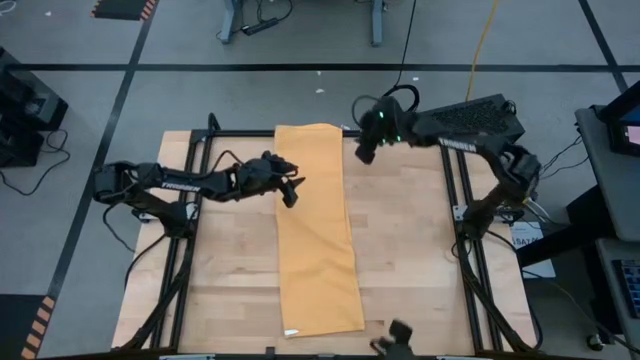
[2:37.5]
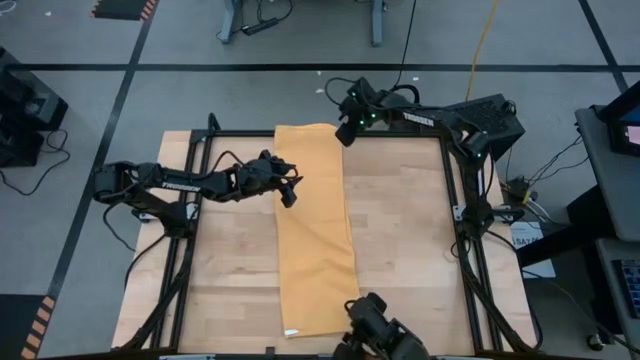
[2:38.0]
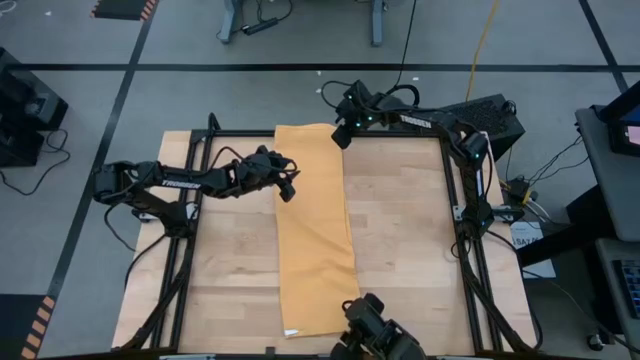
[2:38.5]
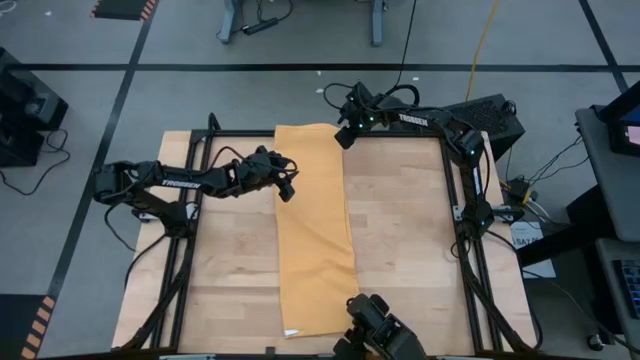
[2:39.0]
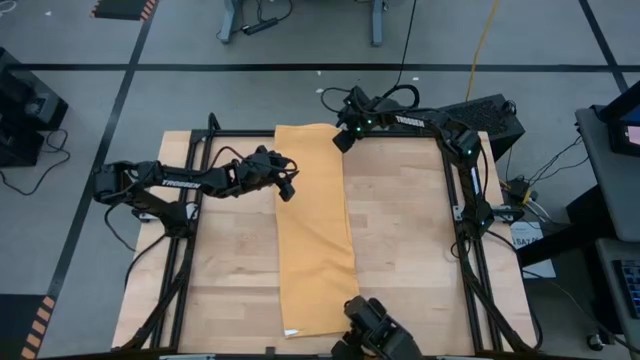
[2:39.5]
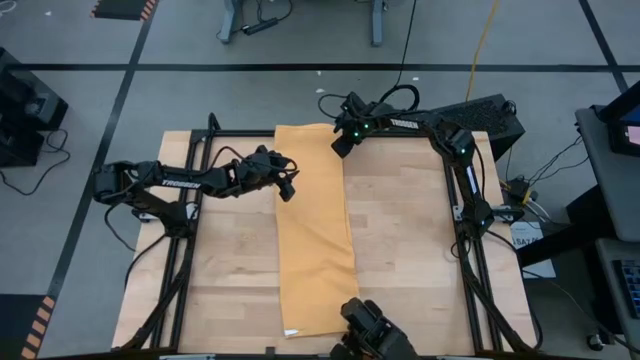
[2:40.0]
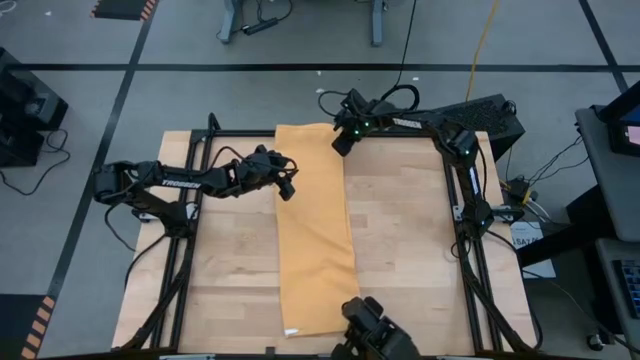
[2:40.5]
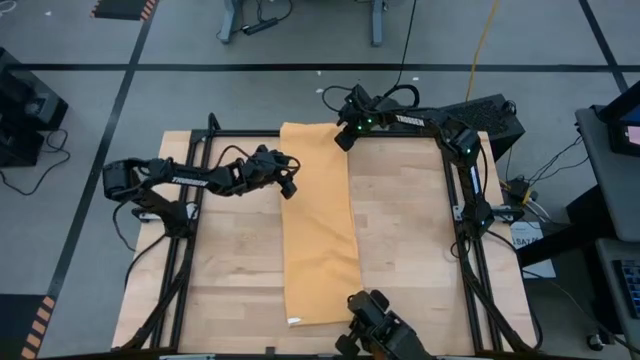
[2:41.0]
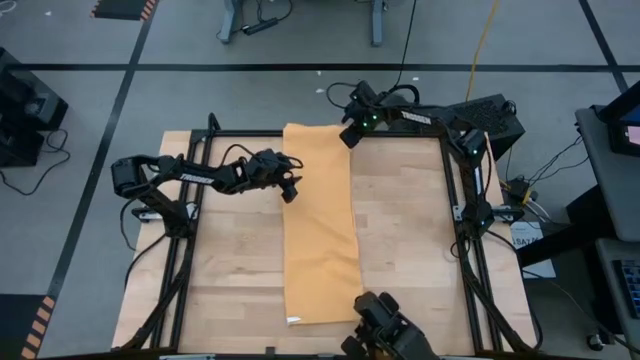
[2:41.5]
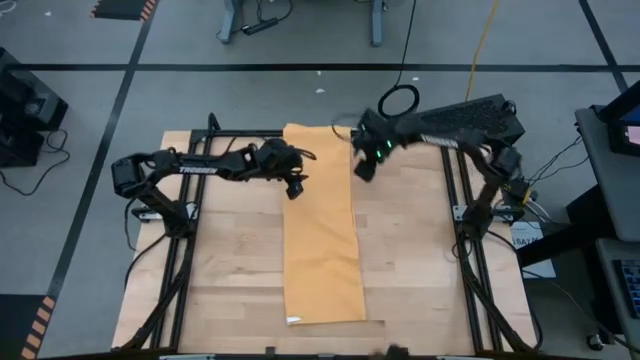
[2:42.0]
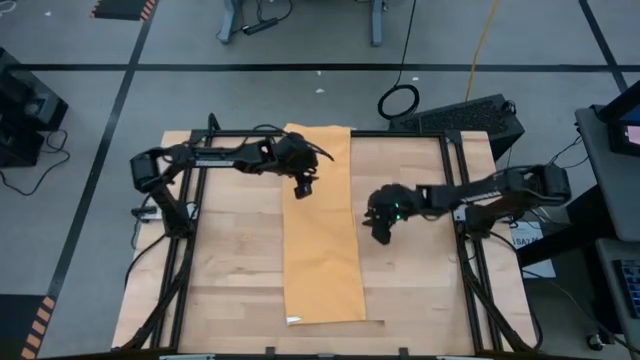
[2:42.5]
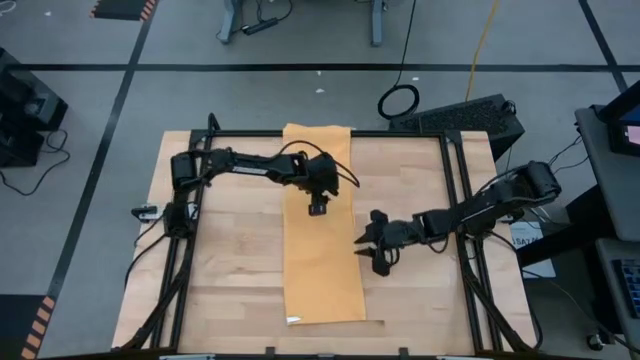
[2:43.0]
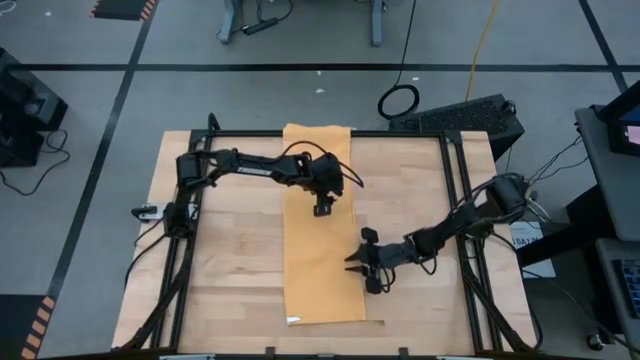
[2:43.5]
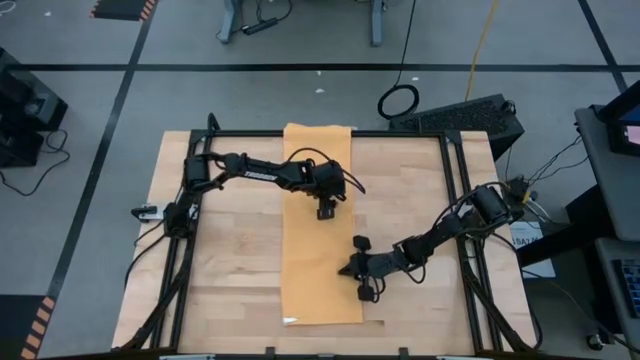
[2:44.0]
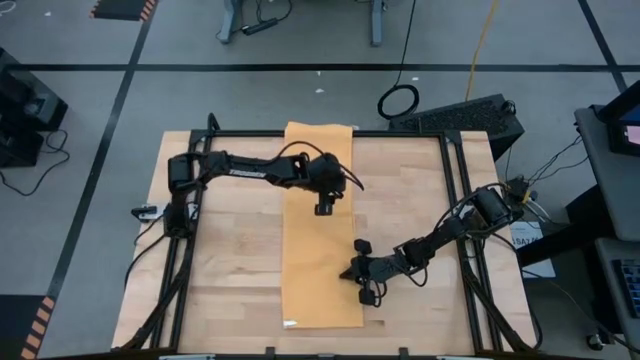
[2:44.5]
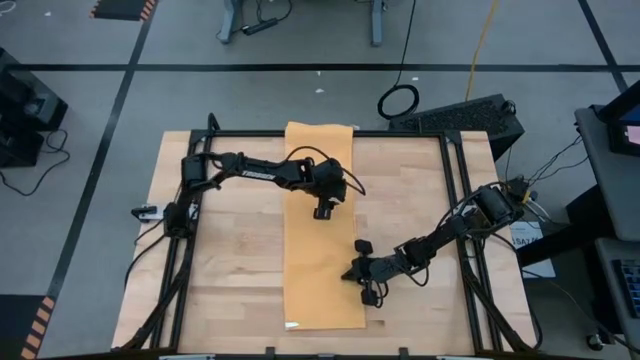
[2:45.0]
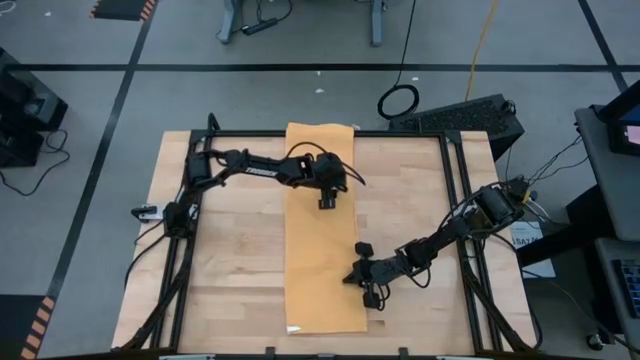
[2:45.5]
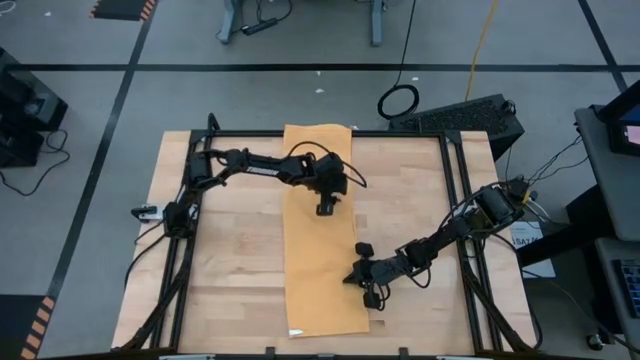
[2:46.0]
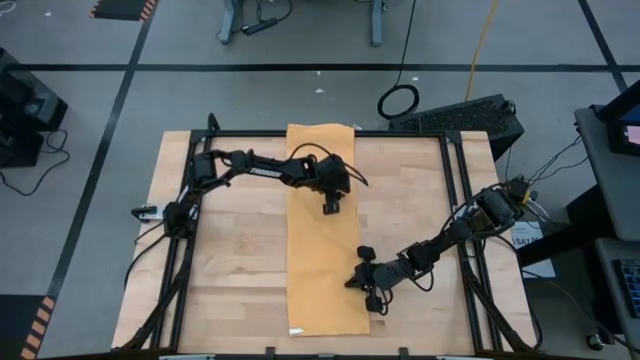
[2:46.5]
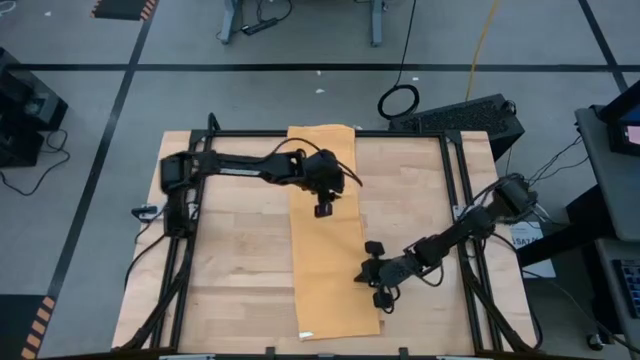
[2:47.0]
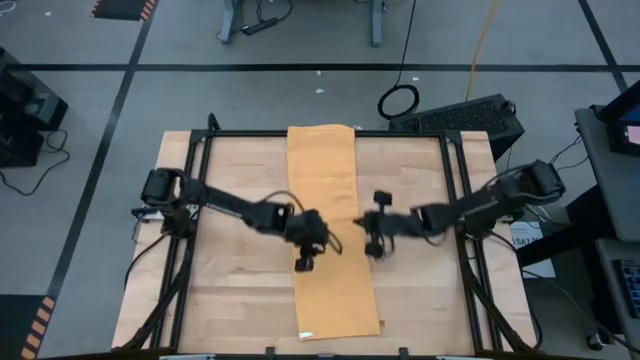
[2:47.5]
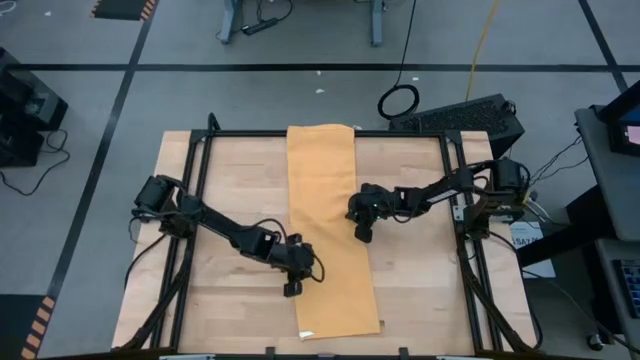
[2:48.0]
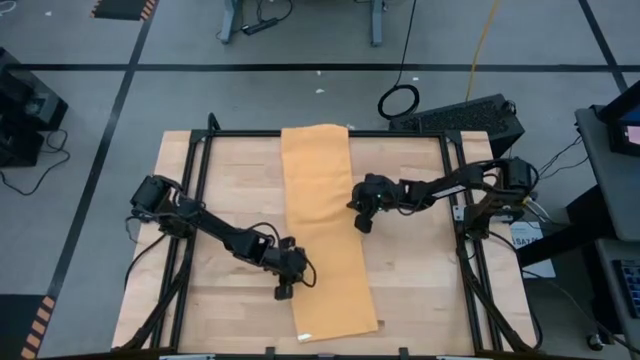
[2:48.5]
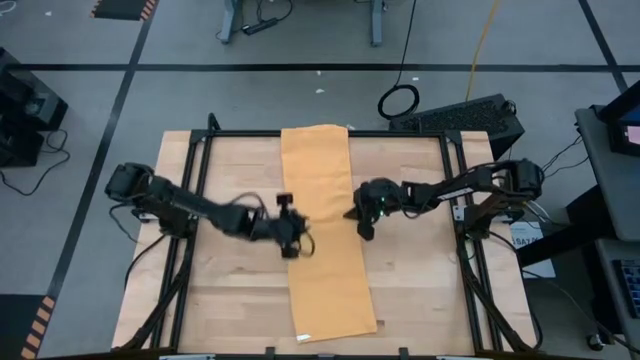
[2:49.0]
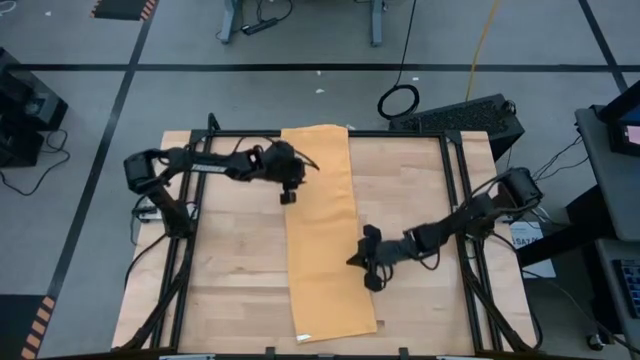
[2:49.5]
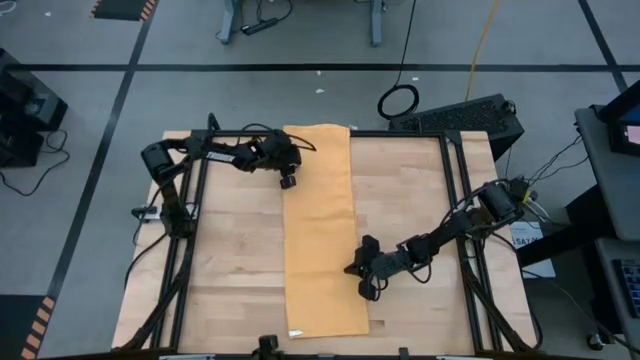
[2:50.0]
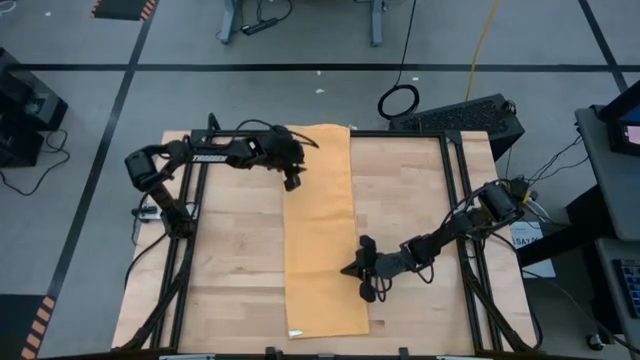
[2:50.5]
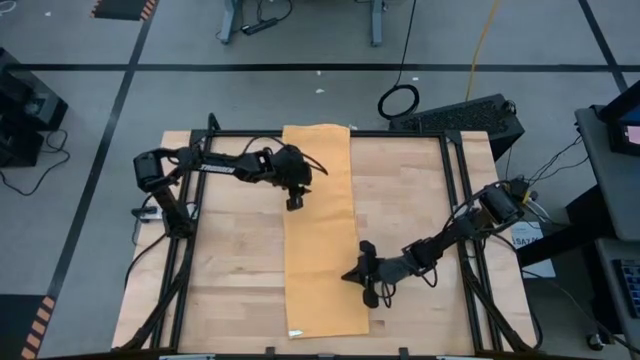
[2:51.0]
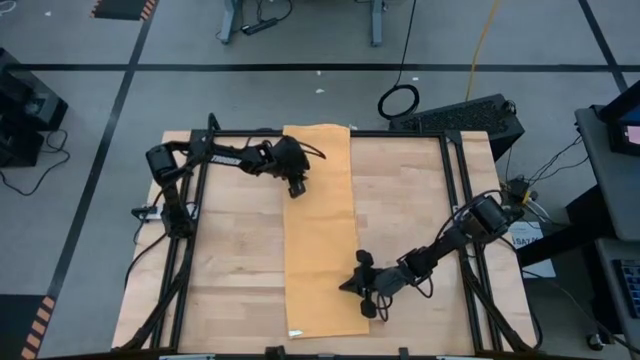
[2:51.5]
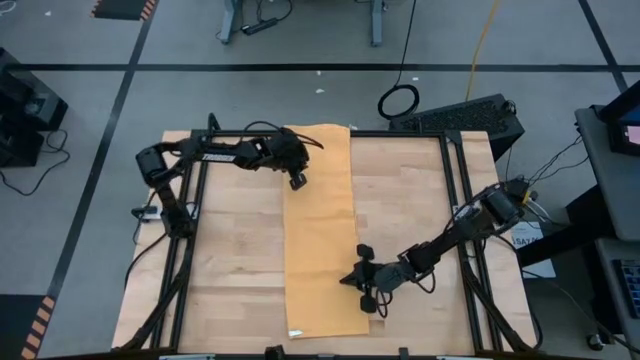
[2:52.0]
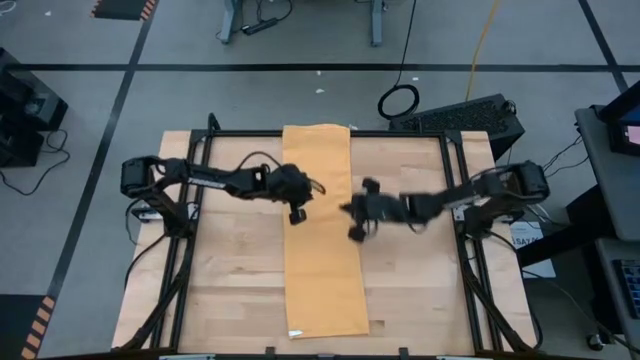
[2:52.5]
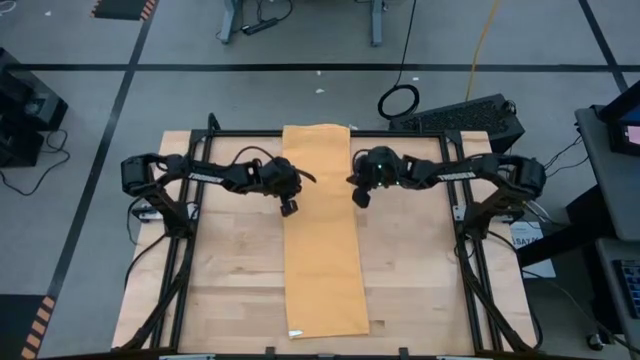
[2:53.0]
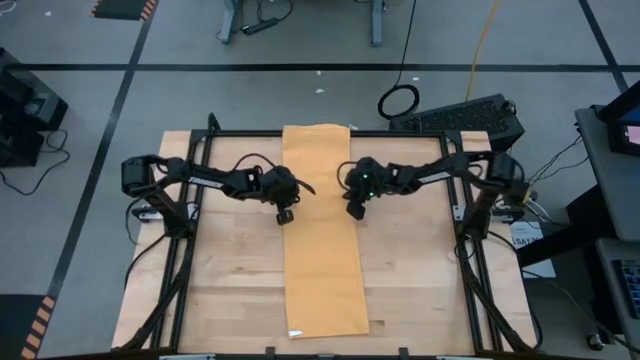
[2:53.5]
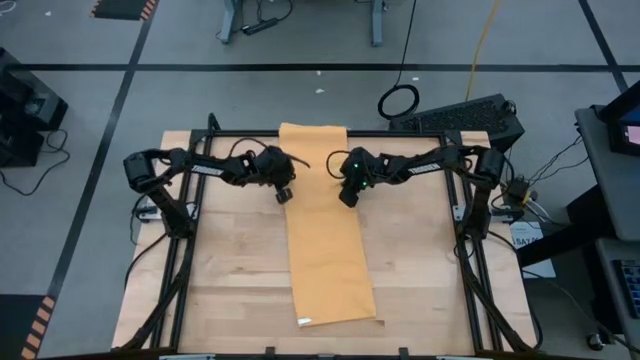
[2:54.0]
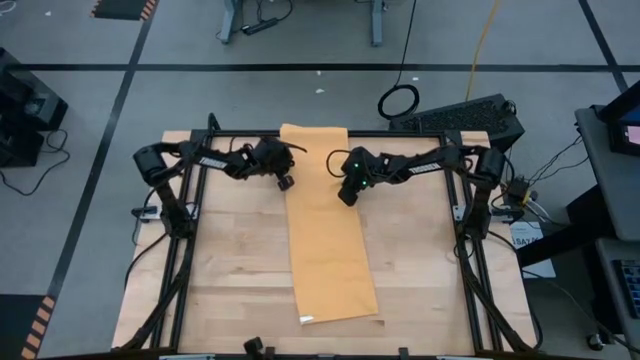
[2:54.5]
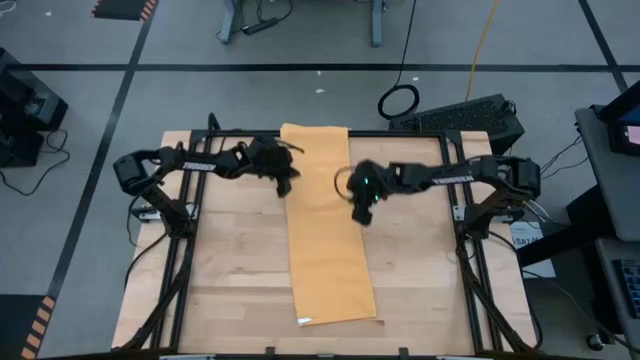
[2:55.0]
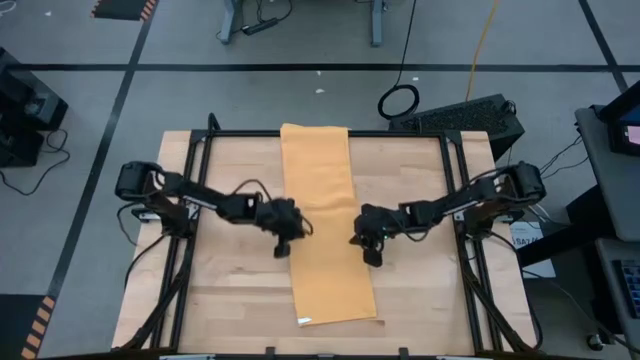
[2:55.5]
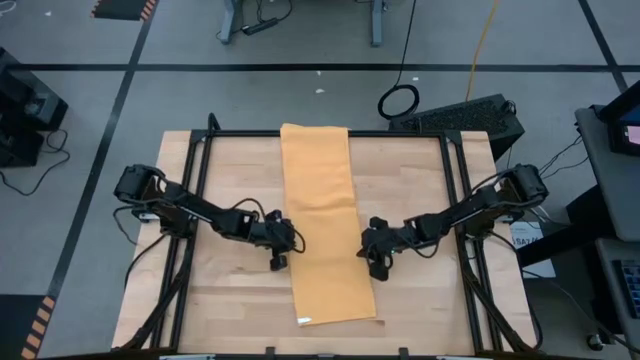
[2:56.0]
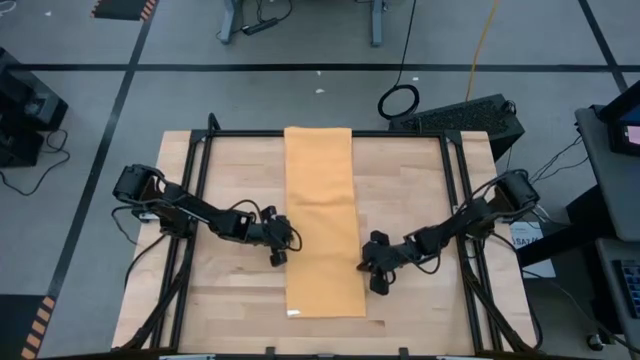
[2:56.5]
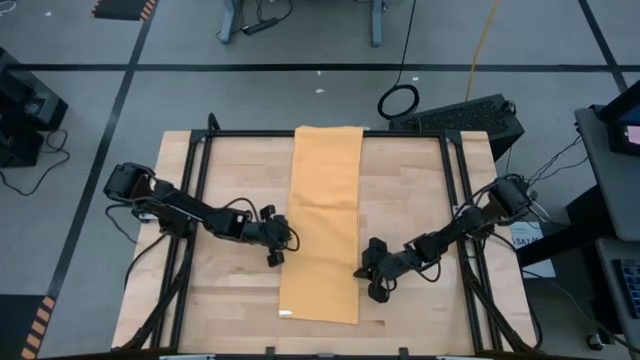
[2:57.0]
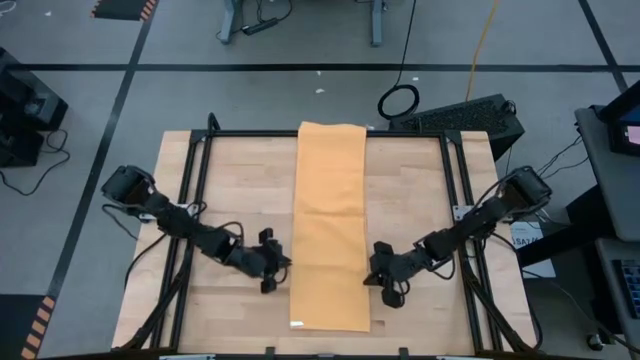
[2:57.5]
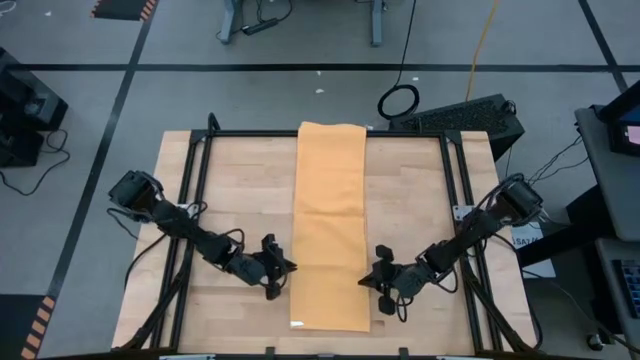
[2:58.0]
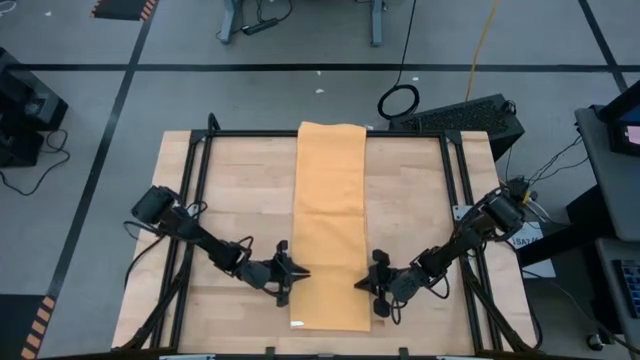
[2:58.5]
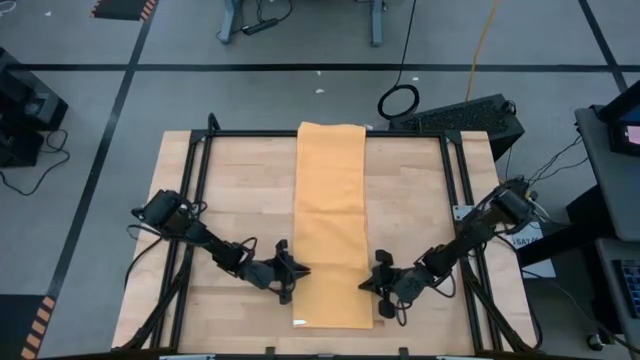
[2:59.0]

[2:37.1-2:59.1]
Task: Roll towel
Fold the yellow towel
